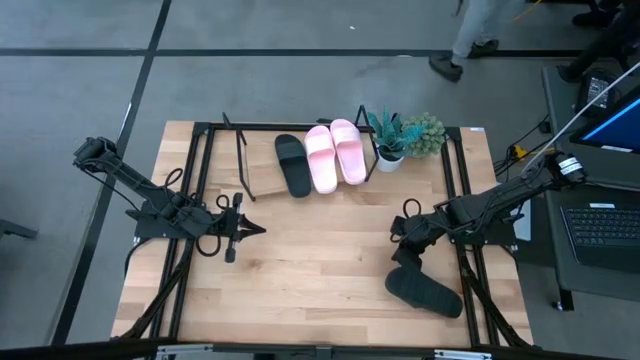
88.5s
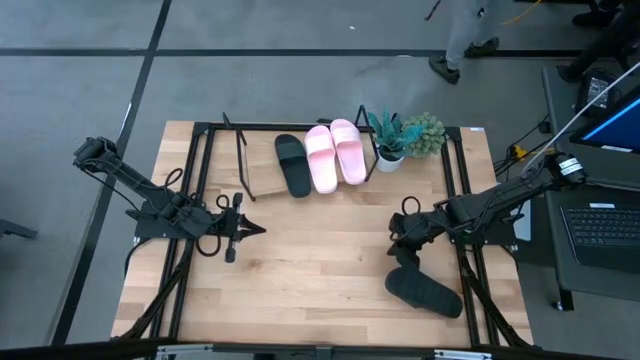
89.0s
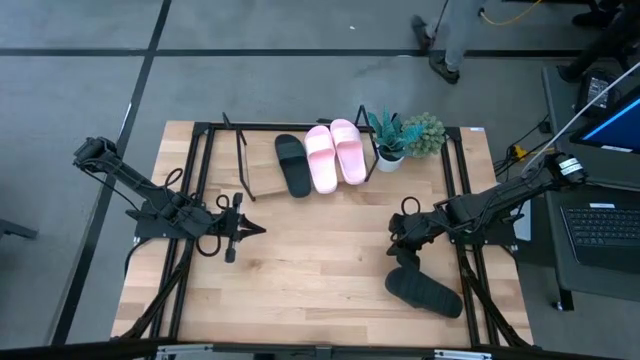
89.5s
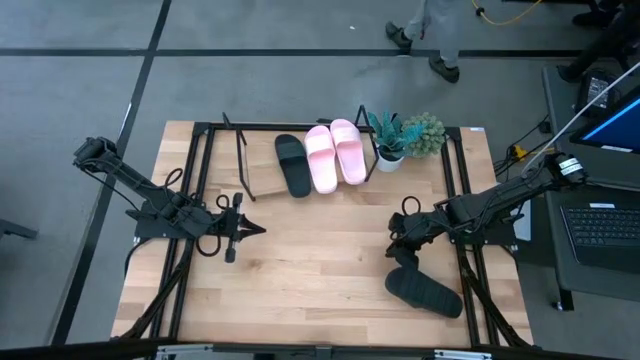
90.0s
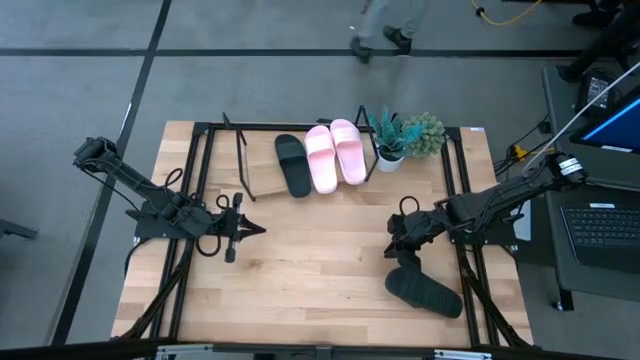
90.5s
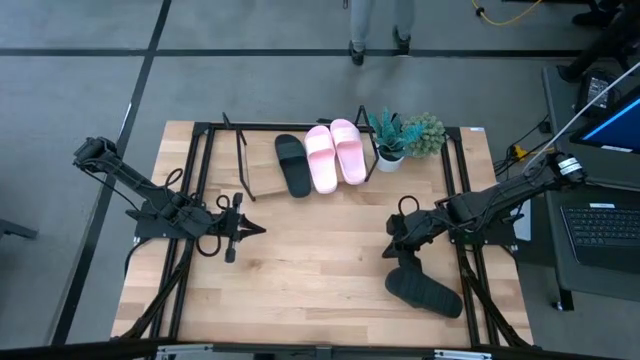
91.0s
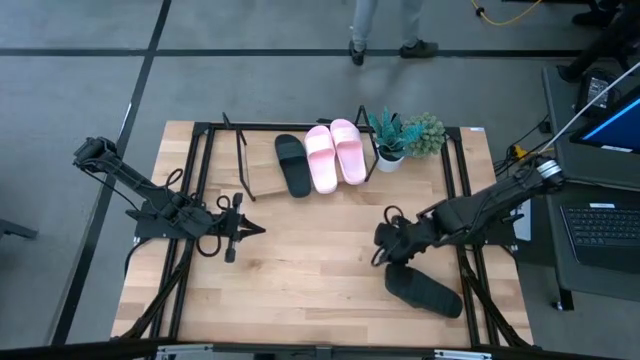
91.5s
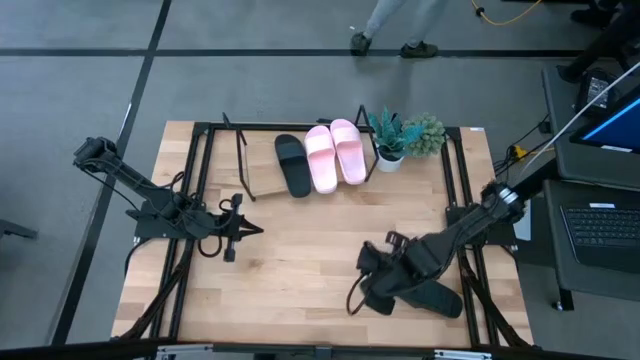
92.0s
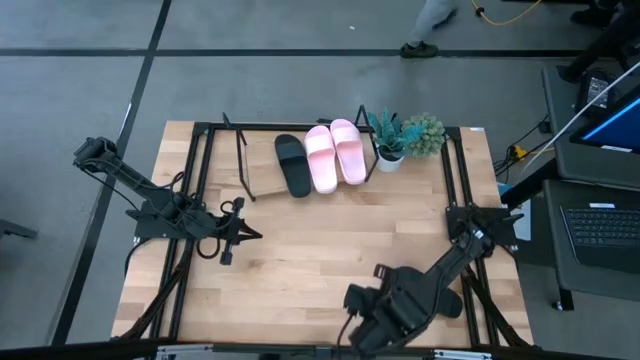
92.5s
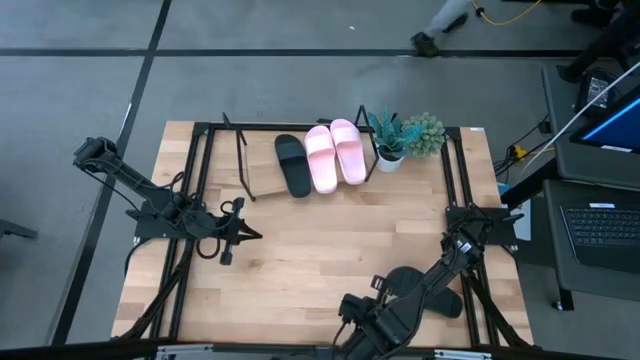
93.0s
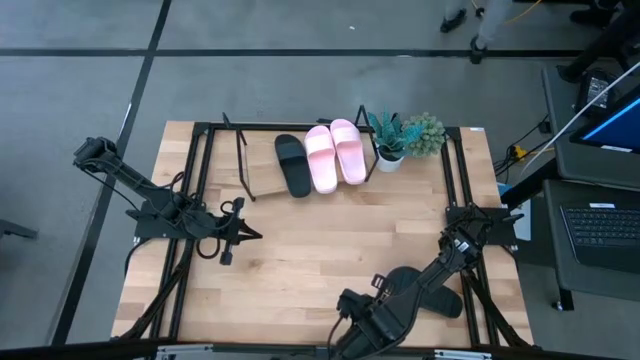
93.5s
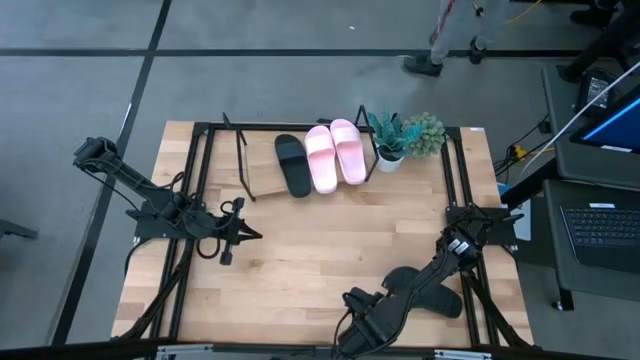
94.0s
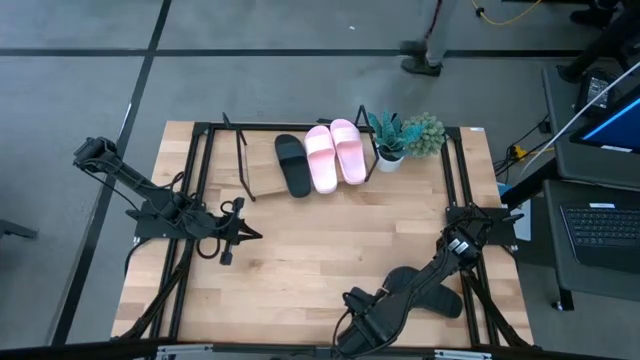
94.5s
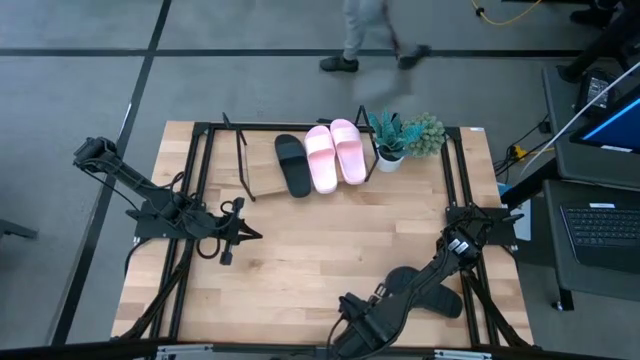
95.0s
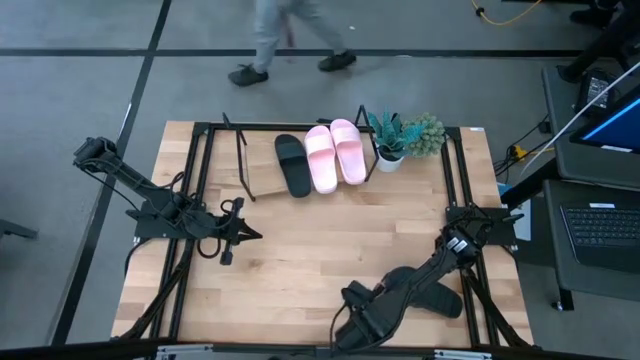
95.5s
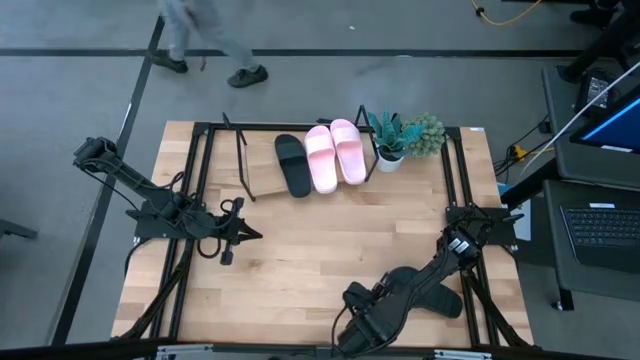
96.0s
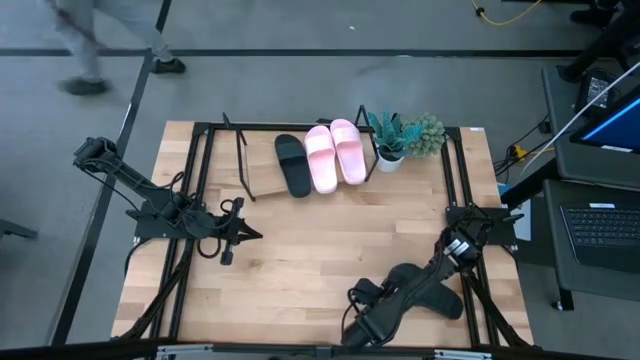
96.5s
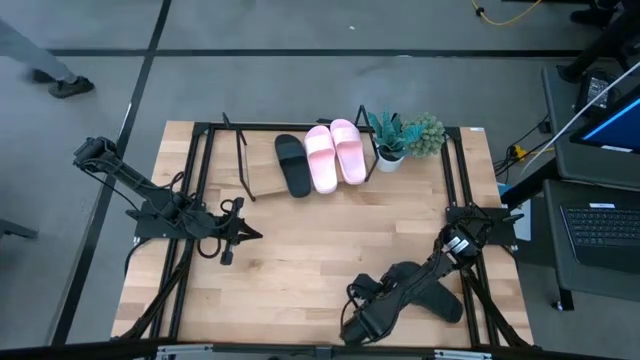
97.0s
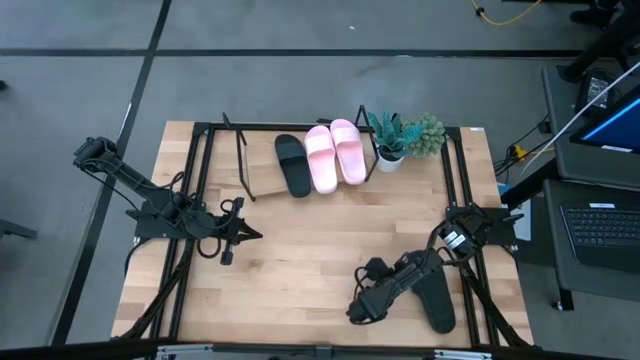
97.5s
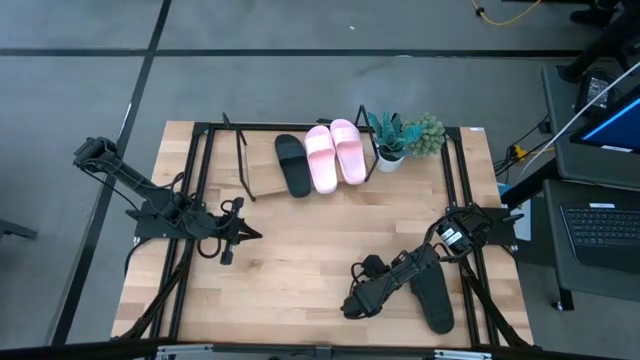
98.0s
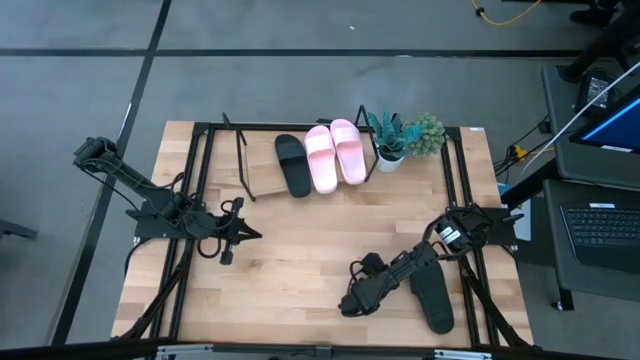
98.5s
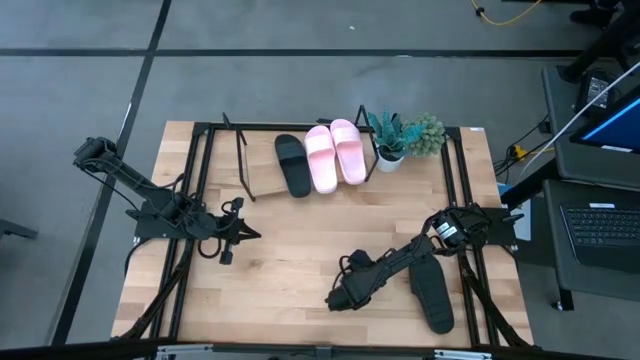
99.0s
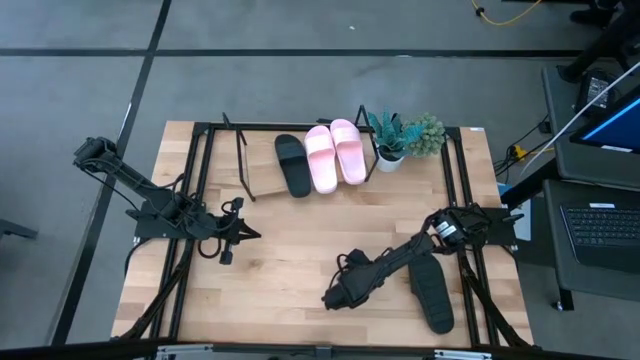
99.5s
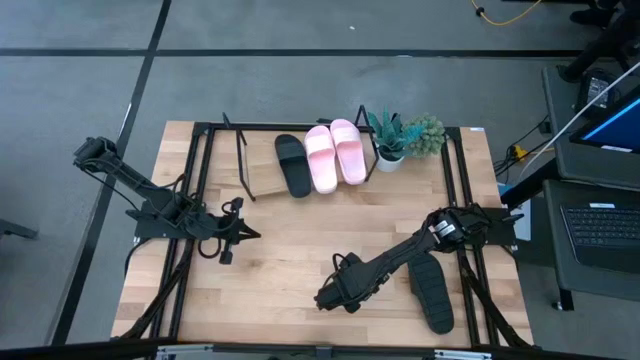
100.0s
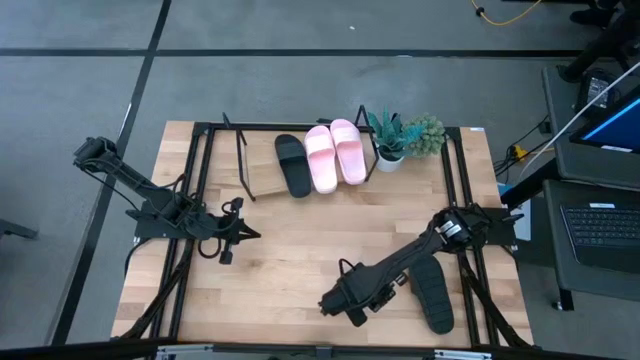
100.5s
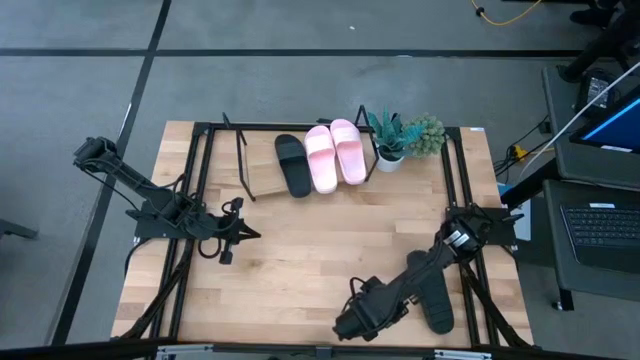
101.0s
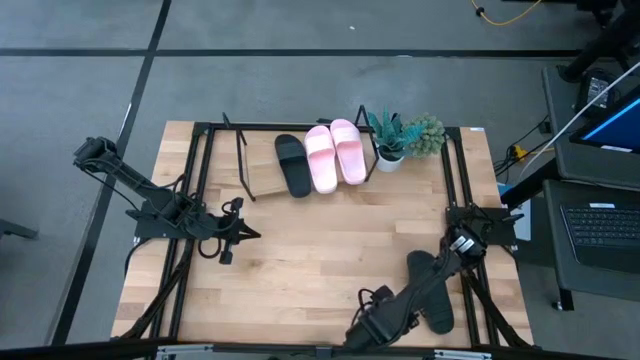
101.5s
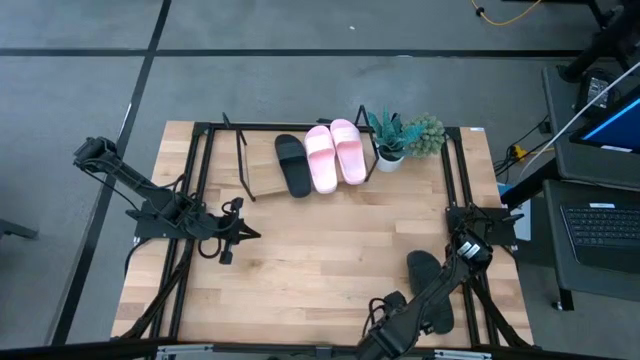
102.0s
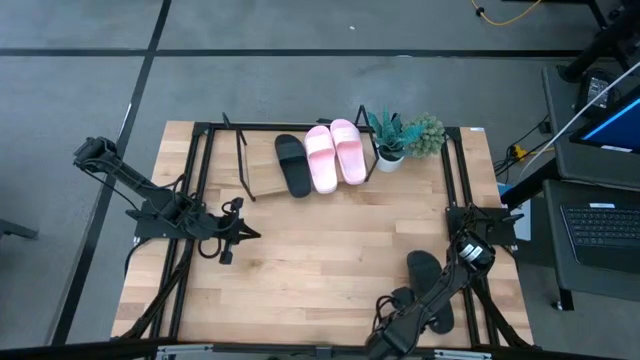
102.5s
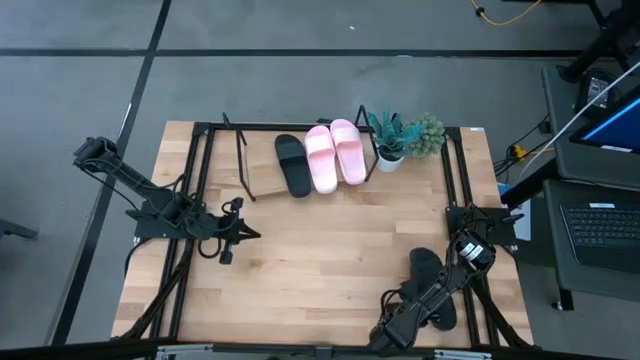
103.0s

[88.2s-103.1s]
Task: Pick and place slides into the shelf
Put the black slide on the shelf

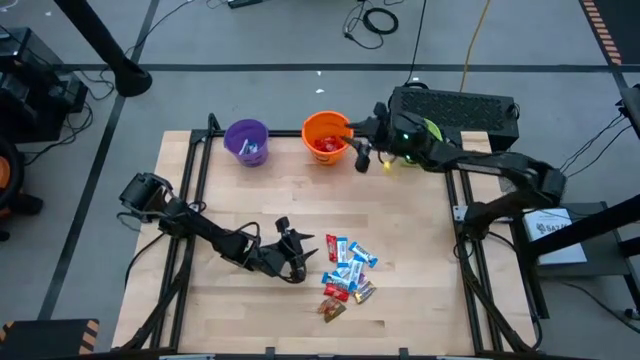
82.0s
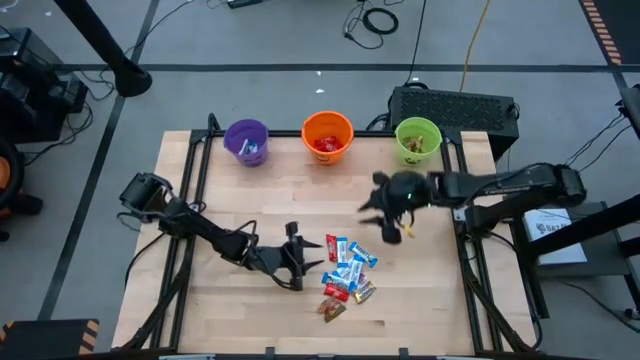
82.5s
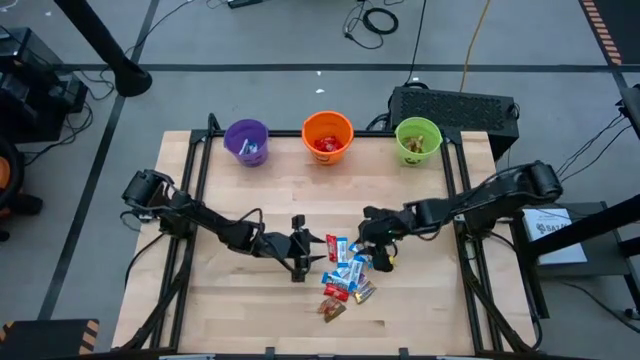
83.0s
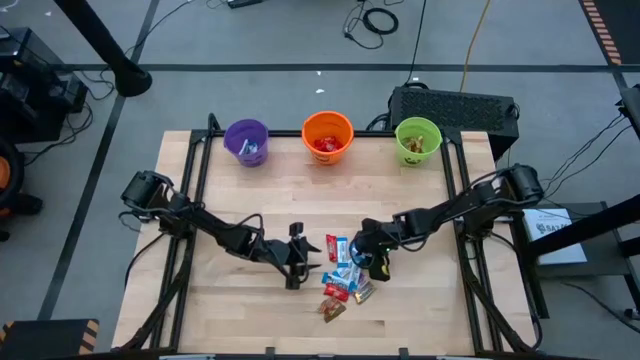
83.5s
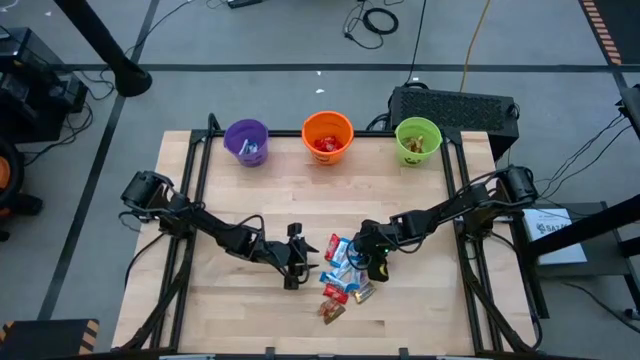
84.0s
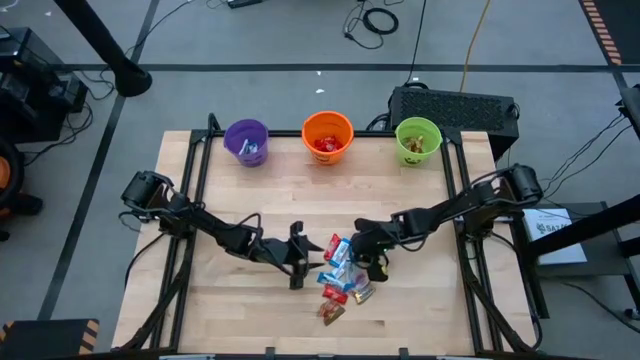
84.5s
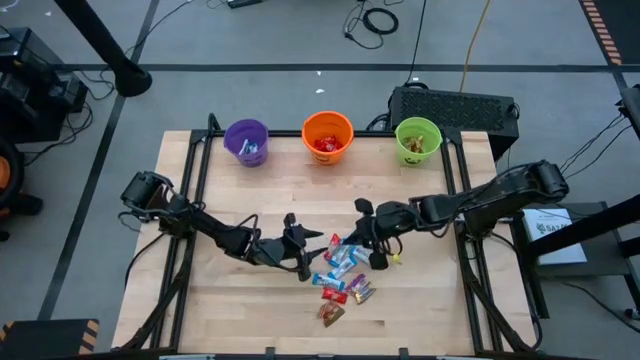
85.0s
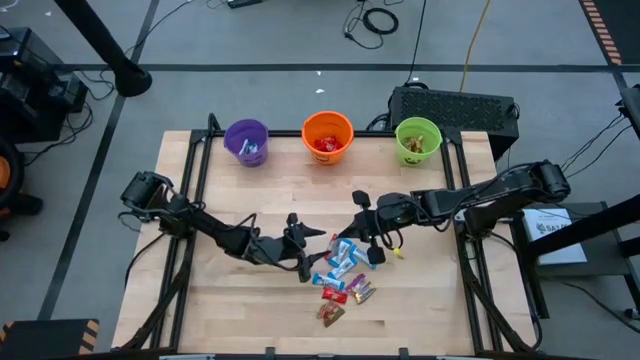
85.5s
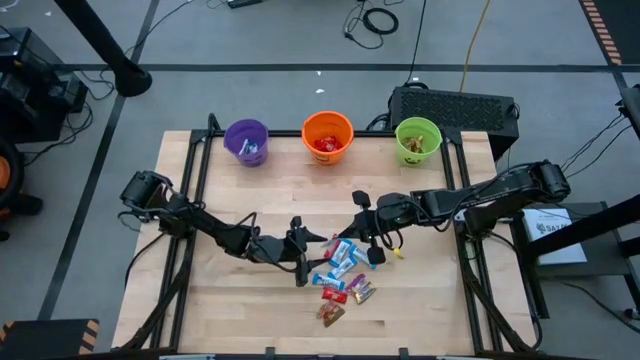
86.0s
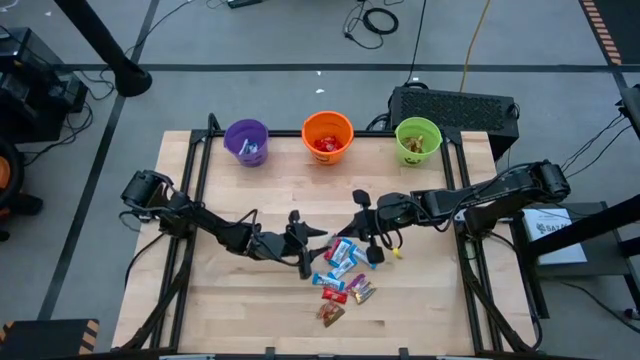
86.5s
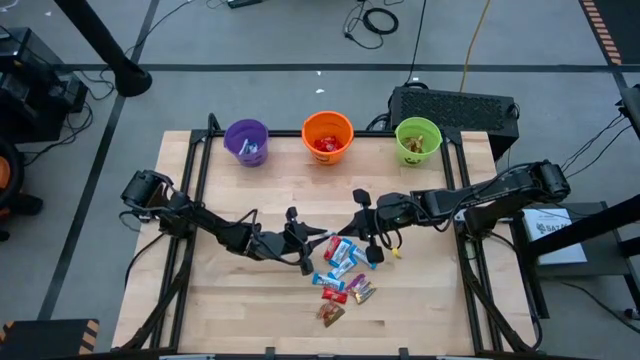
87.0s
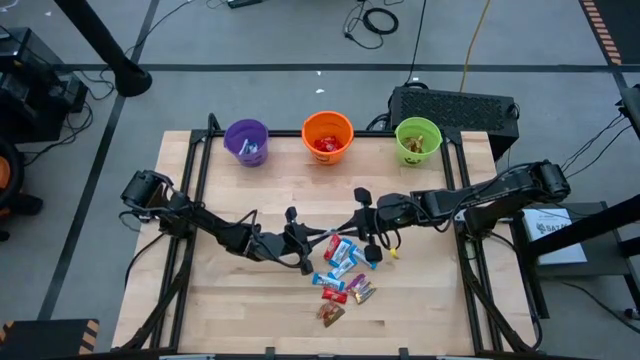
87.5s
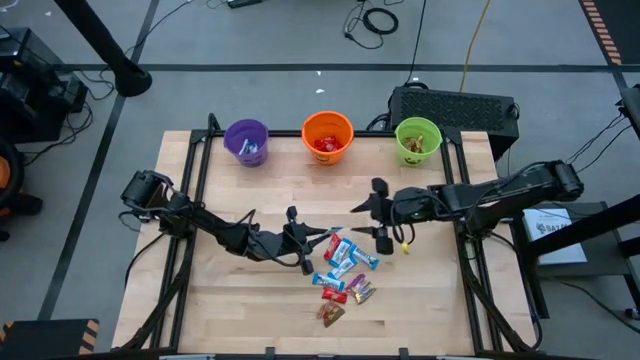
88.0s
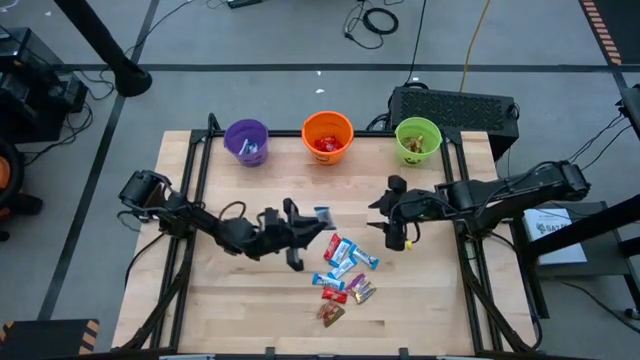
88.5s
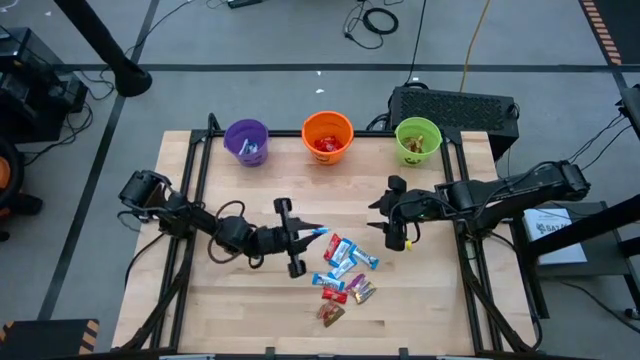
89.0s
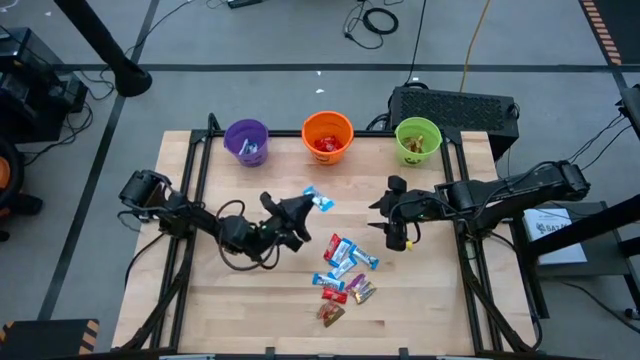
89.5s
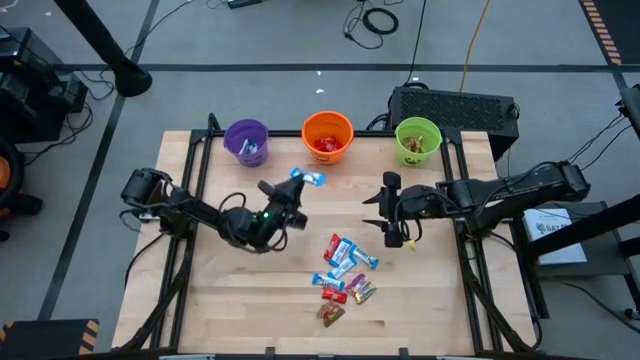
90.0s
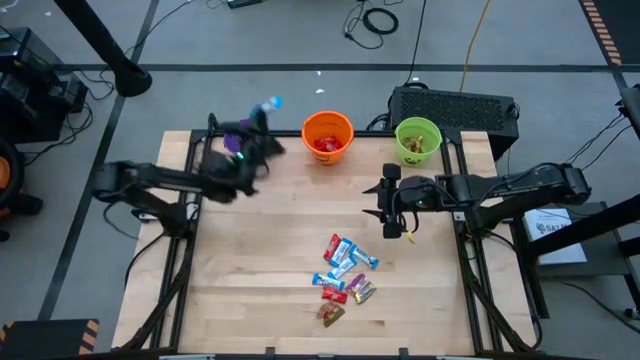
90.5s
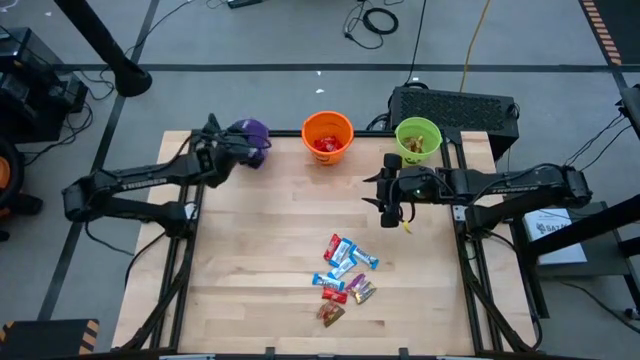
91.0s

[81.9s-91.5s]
Task: Sort candy by brand, put in halloween buckets
Put the white chocolate into the purple bucket
